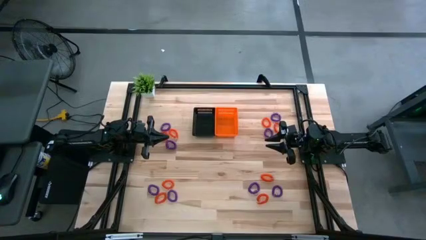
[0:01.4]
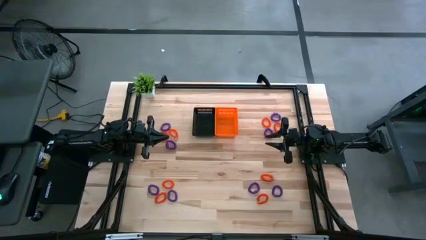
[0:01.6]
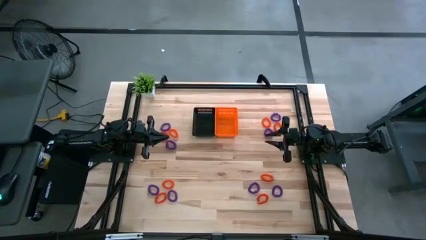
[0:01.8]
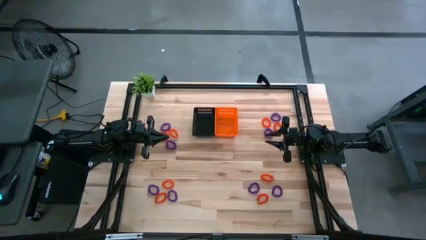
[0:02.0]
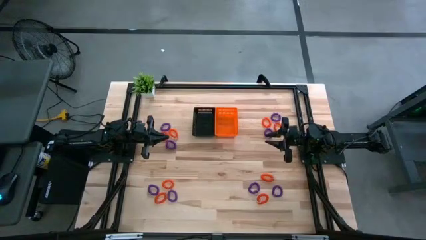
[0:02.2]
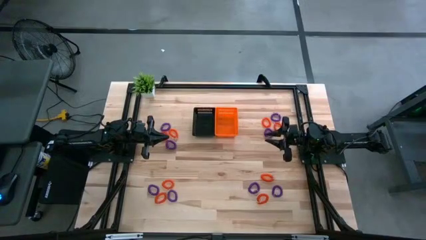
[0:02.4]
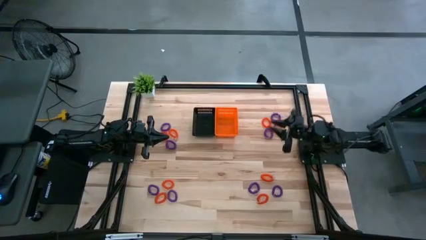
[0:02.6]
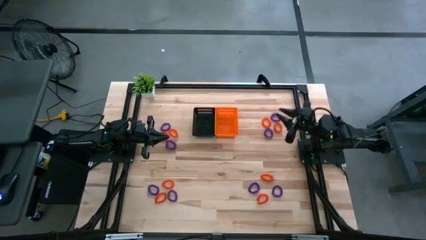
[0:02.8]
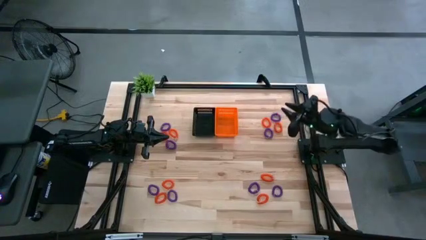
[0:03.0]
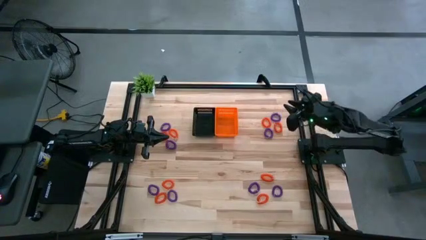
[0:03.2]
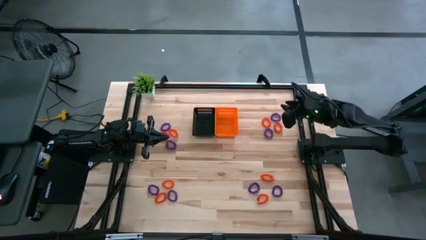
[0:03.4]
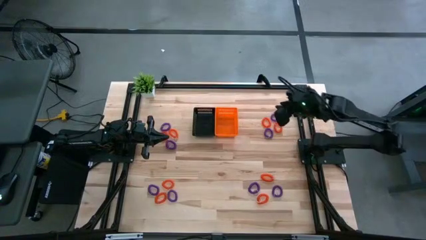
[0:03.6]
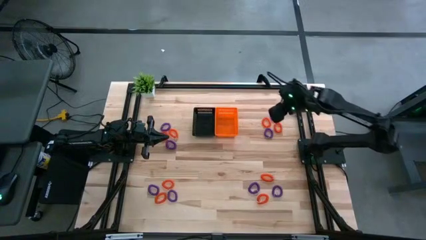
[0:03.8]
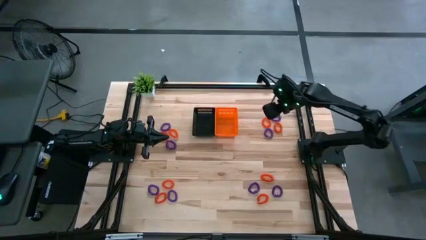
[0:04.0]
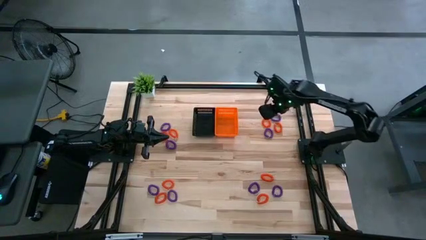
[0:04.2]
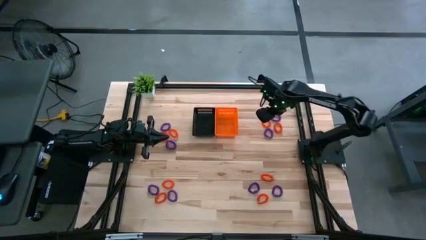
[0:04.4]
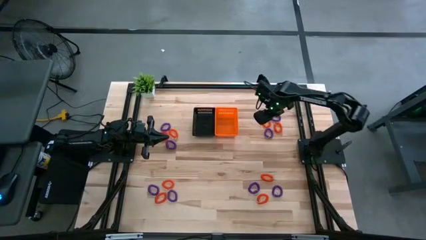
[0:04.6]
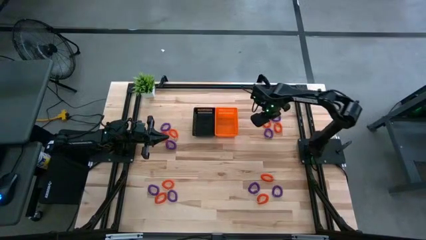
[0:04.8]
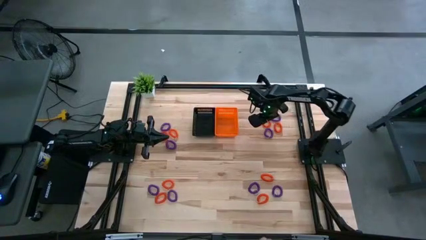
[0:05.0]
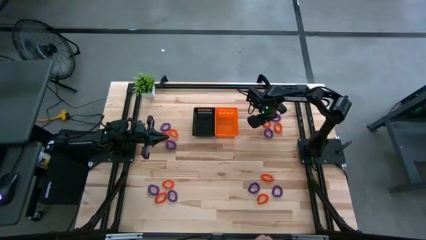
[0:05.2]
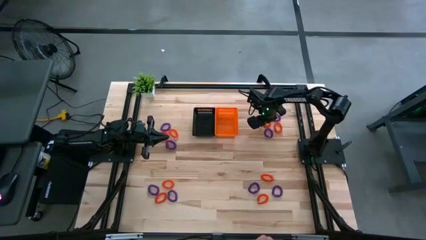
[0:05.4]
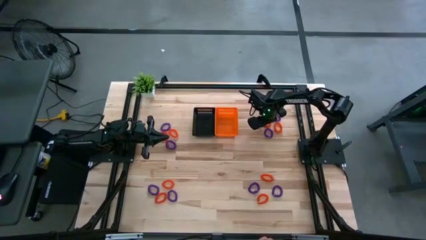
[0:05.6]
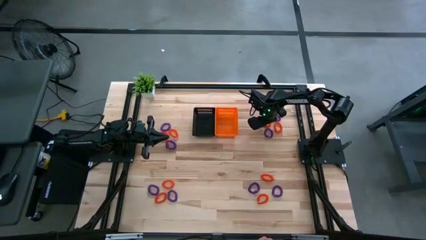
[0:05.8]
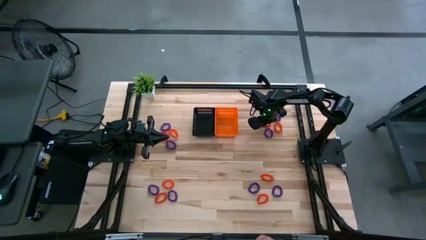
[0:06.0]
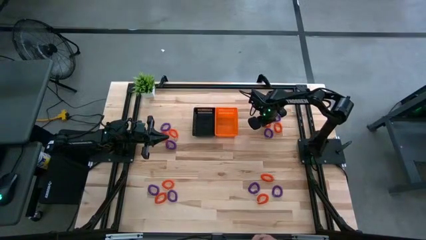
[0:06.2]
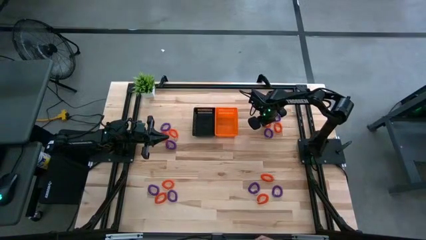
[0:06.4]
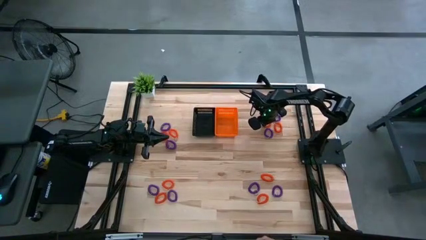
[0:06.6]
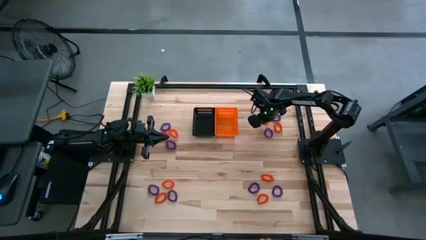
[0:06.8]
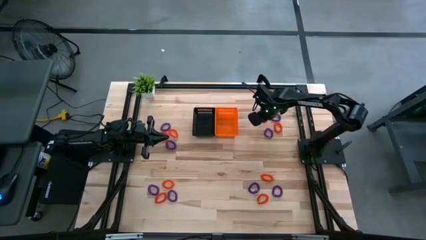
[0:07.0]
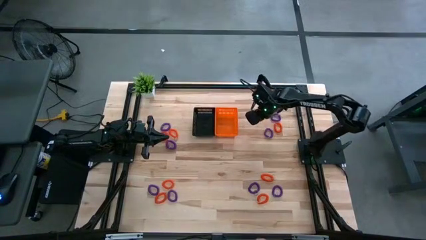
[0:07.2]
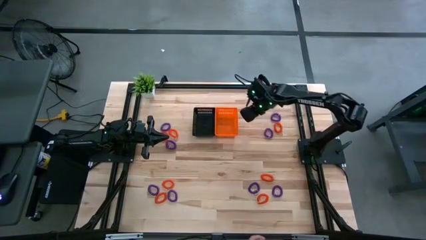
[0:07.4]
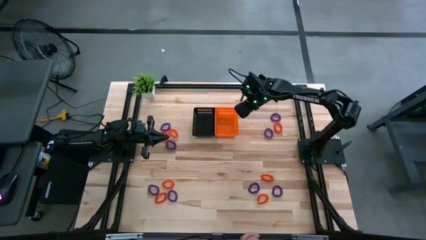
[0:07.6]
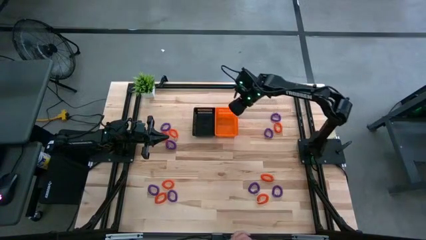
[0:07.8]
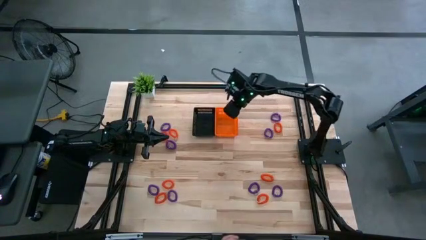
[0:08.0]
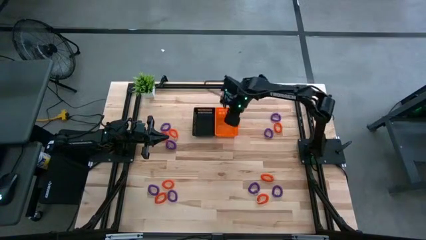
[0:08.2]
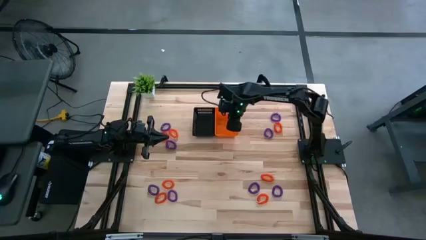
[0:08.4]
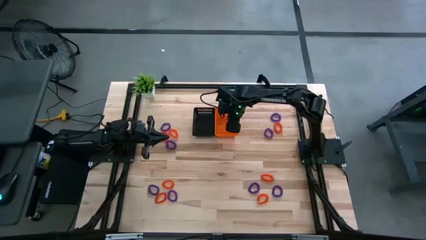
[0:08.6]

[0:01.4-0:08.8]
Task: Sort spring keychains into baskets
Put the orange spring keychain into the orange basket

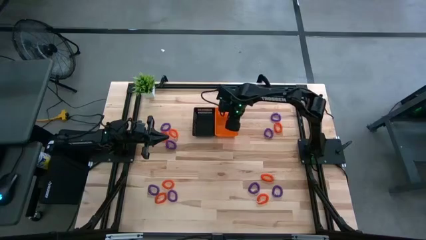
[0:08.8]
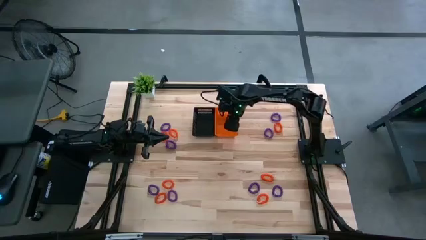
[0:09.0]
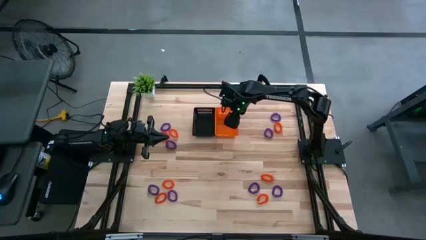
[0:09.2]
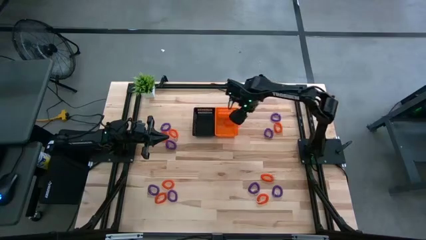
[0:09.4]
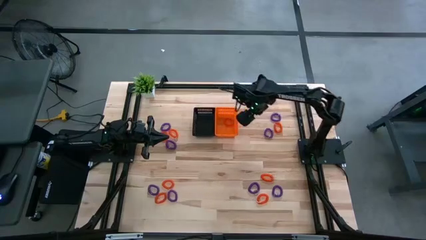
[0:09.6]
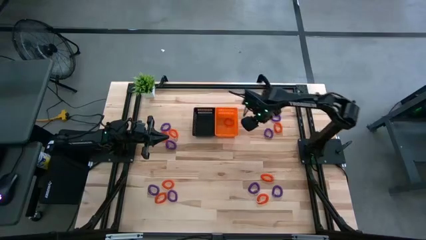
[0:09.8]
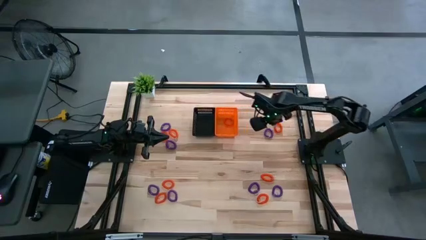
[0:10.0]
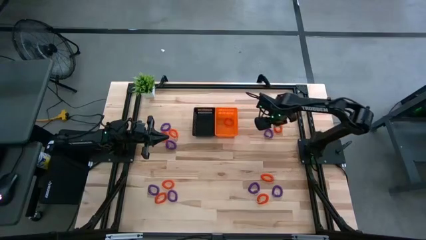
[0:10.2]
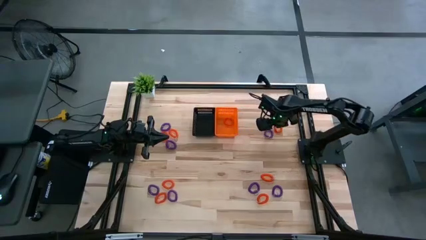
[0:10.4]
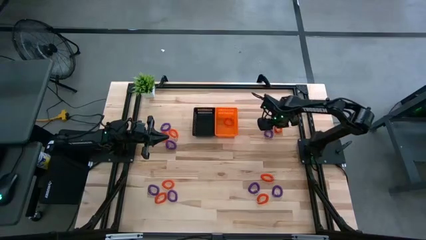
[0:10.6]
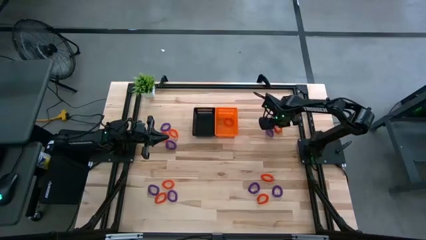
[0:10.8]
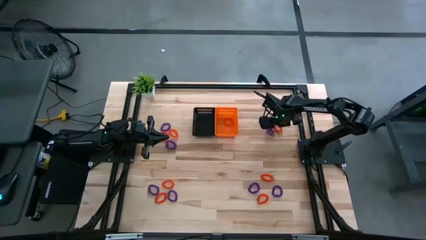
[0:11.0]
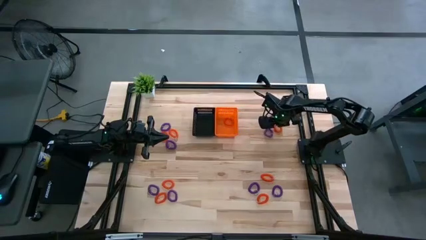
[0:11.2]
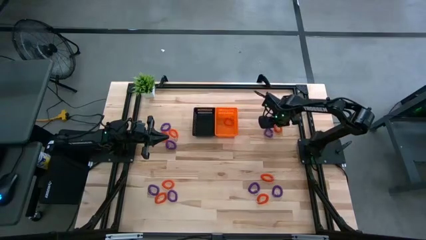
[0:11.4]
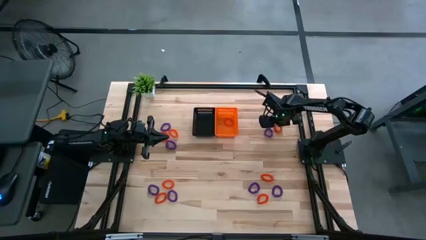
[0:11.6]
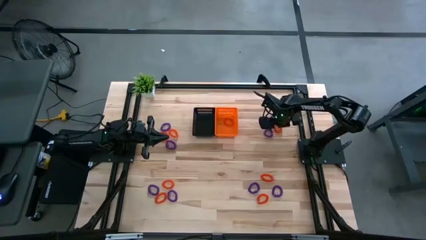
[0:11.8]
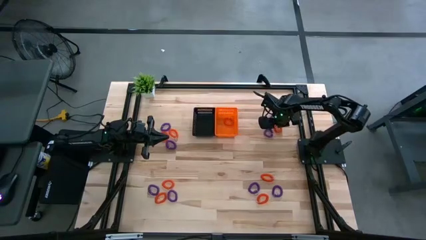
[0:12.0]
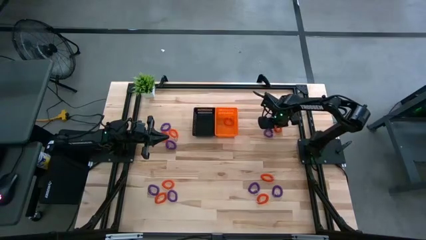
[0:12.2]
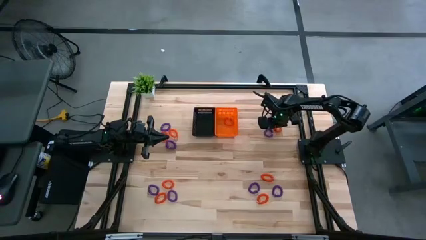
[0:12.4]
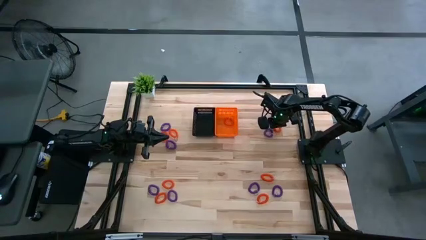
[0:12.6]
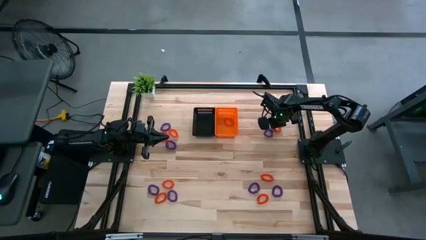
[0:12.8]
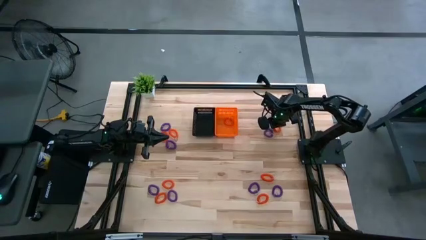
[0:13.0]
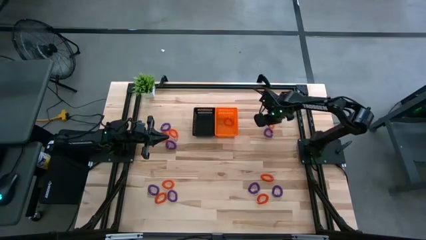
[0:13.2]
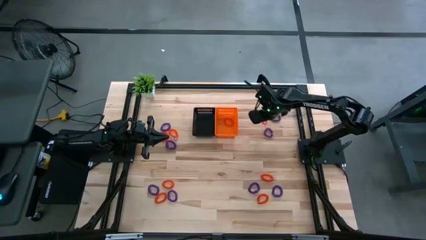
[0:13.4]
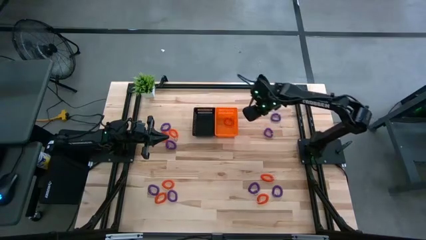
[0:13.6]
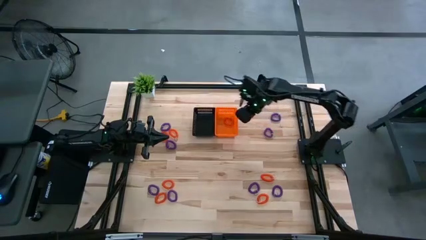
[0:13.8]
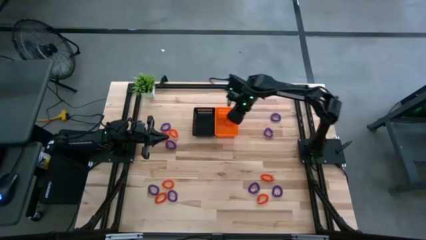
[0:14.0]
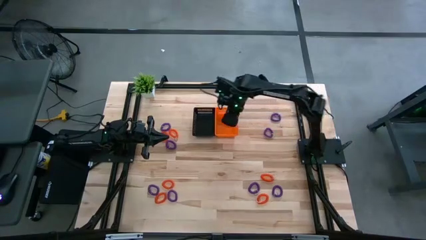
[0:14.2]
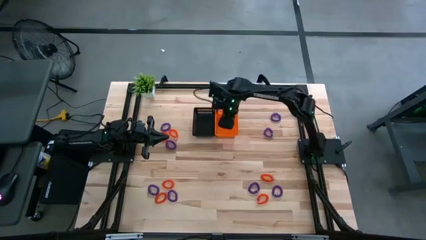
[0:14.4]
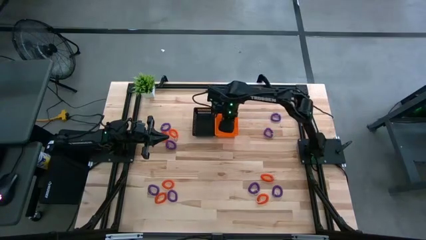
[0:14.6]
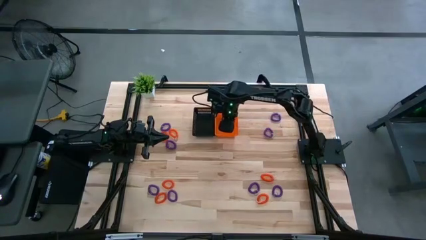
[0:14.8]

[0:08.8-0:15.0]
Put the orange spring keychain into the orange basket

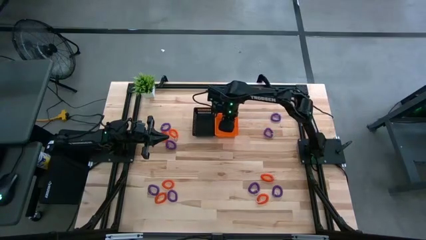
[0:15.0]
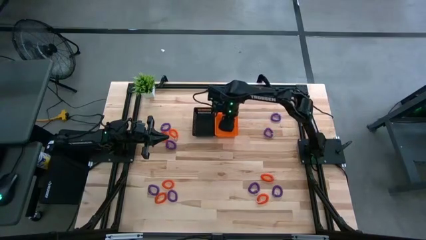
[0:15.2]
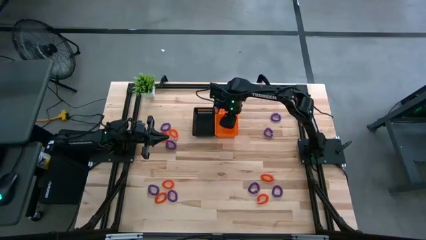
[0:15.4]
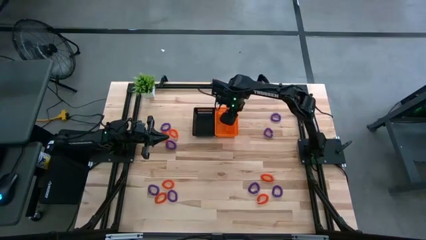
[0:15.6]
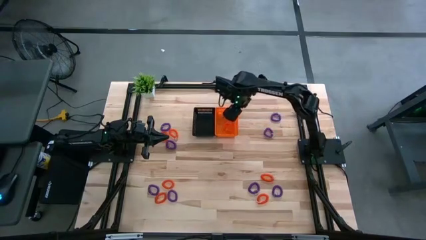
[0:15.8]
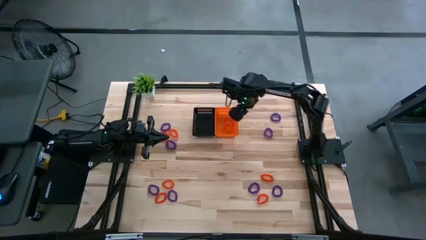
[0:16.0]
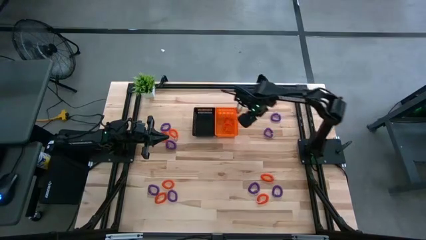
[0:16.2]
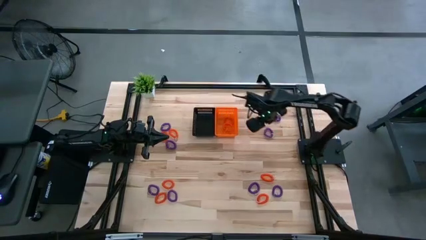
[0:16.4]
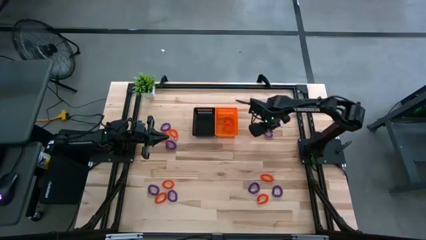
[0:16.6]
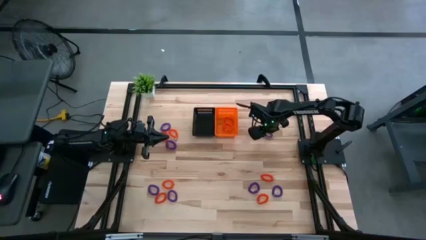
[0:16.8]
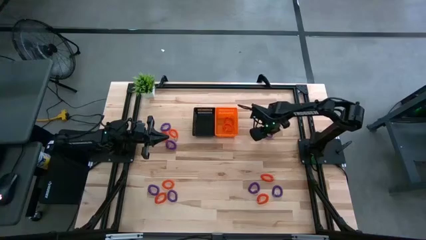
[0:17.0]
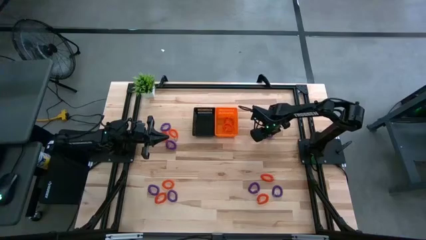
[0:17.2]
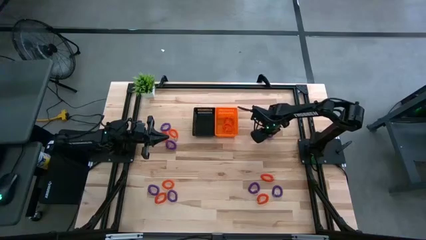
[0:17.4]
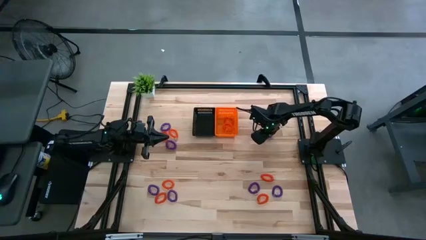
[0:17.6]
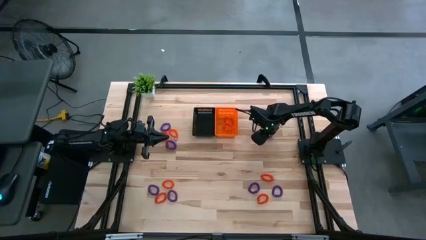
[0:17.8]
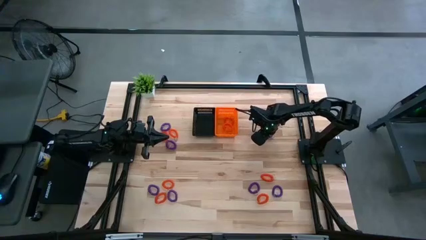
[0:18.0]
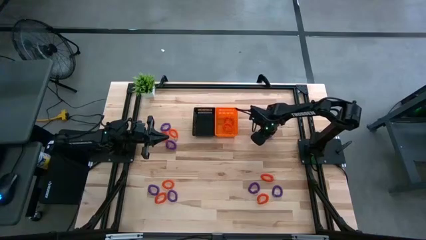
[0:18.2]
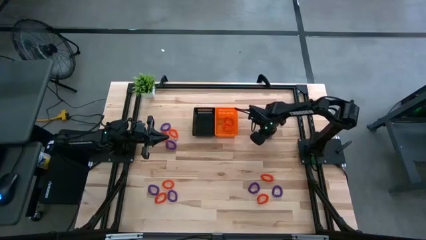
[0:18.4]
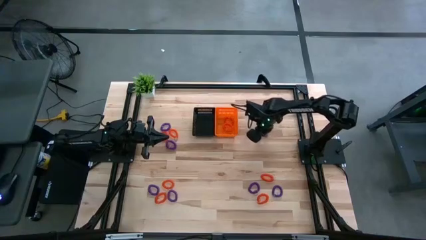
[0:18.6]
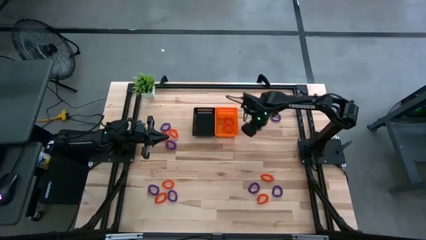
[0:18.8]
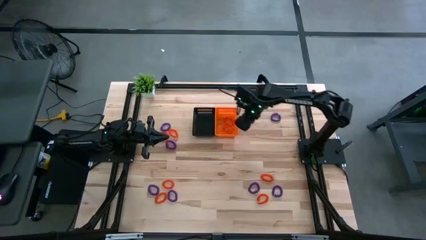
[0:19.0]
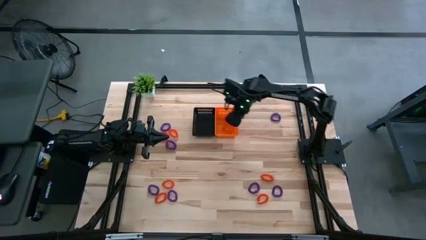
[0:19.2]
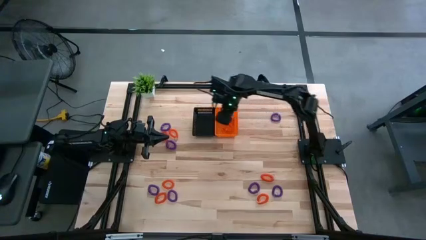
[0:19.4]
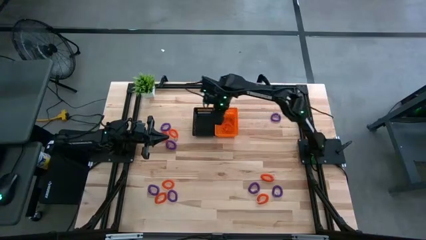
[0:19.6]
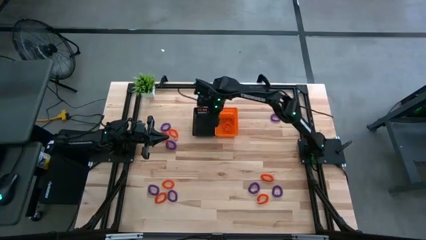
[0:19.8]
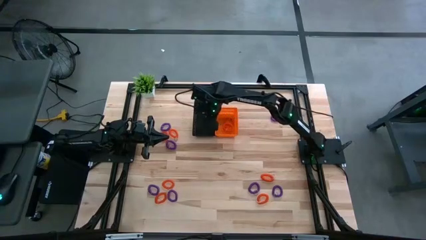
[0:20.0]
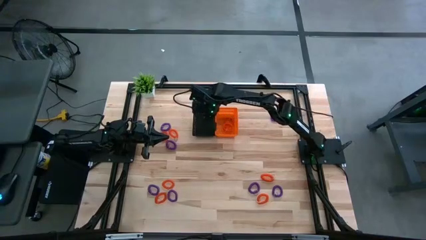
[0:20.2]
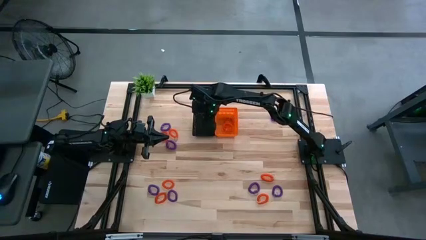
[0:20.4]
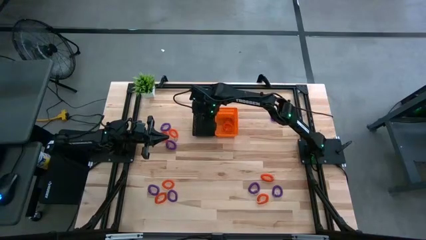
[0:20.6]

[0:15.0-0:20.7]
Put the purple spring keychain into the black basket
